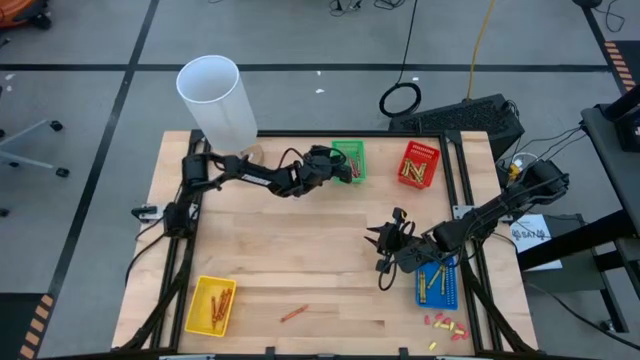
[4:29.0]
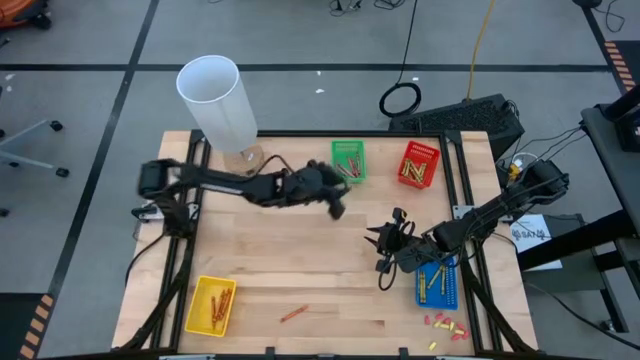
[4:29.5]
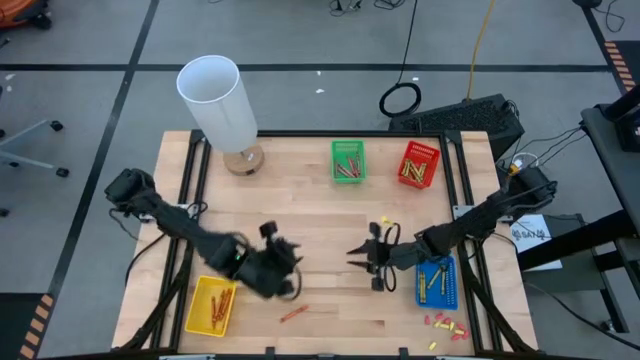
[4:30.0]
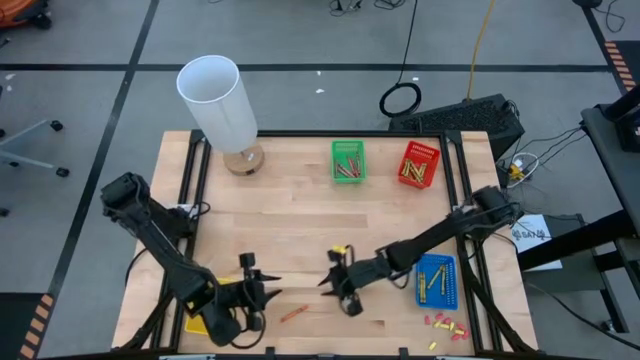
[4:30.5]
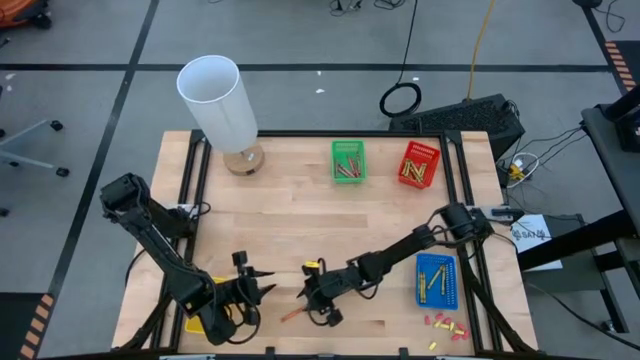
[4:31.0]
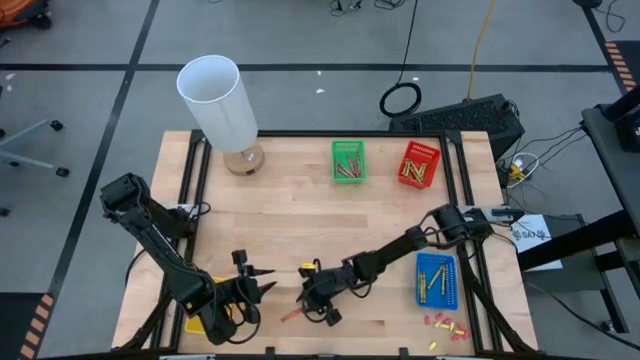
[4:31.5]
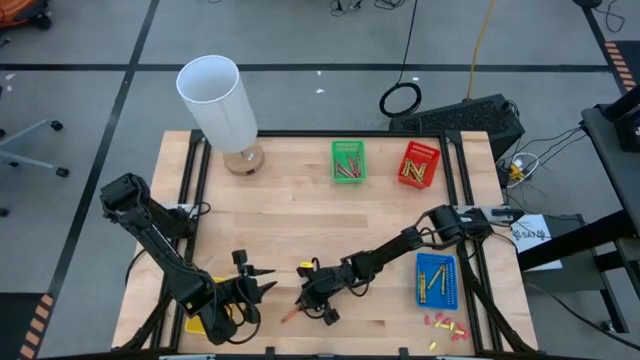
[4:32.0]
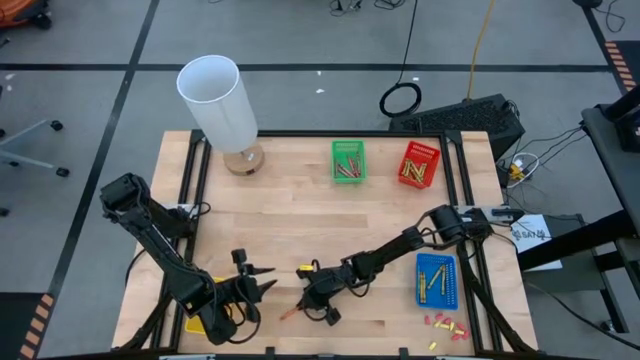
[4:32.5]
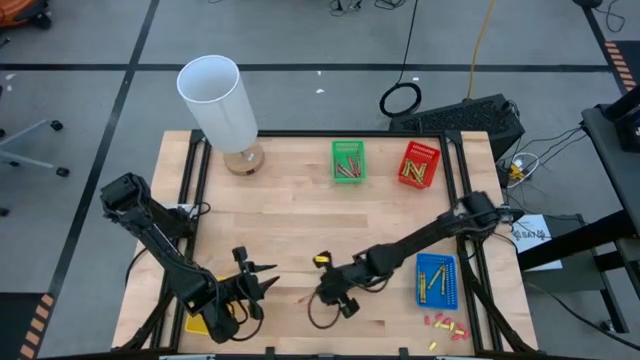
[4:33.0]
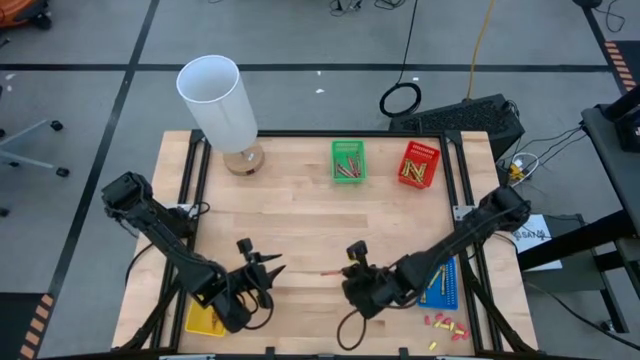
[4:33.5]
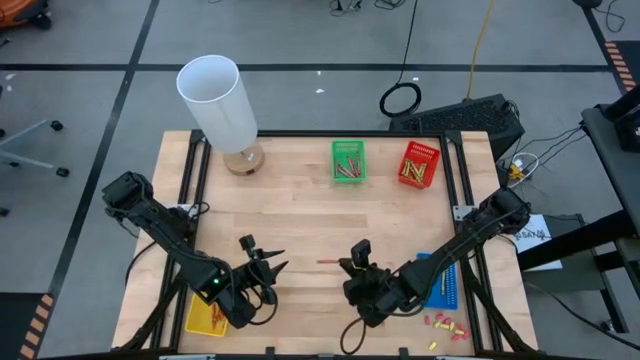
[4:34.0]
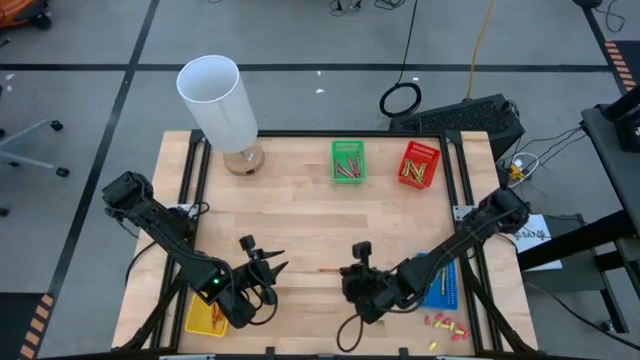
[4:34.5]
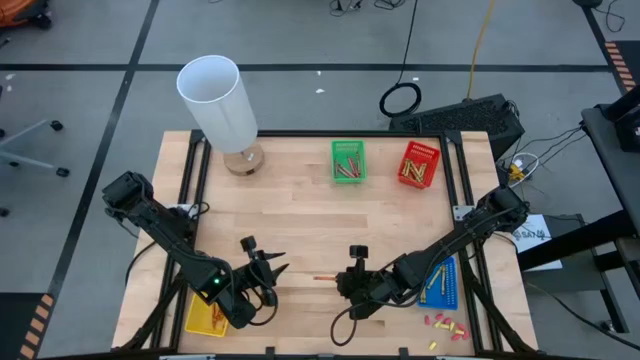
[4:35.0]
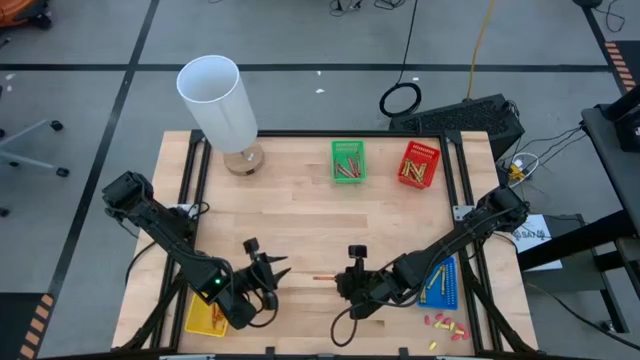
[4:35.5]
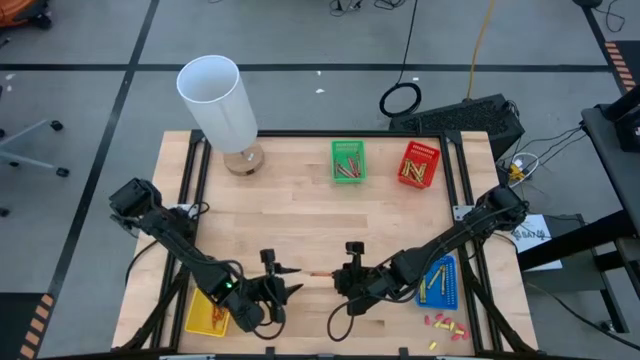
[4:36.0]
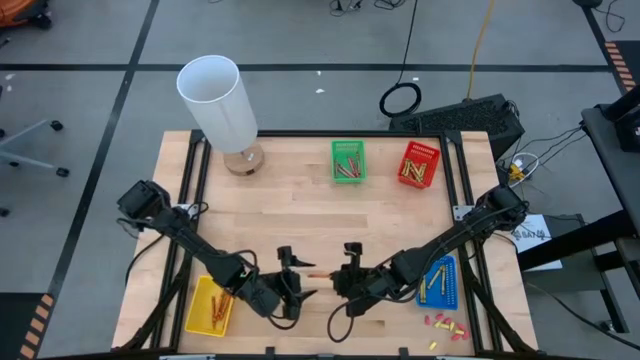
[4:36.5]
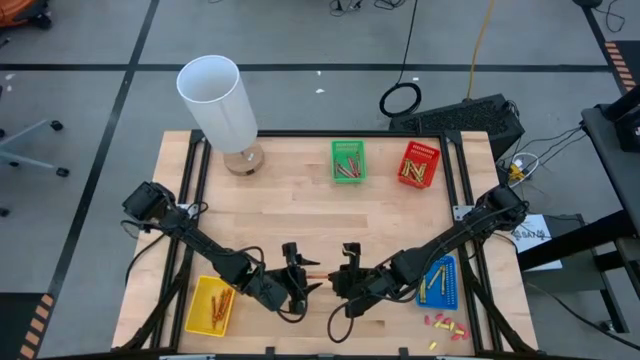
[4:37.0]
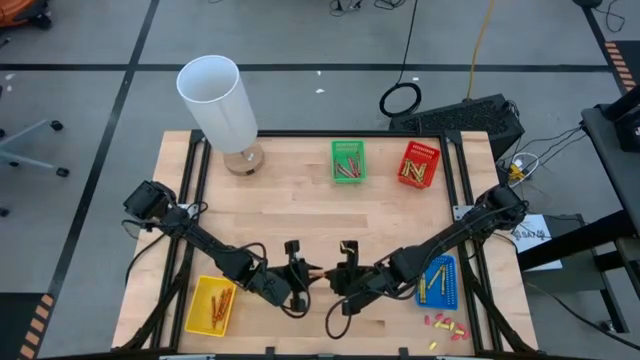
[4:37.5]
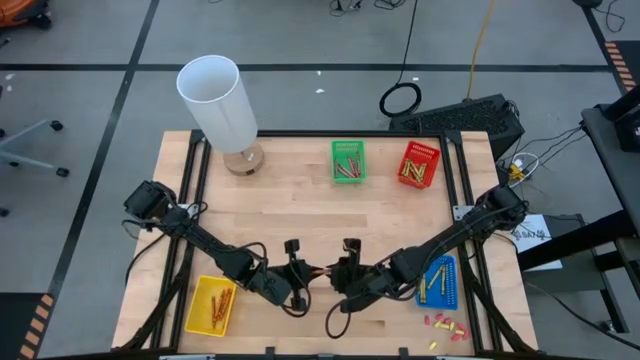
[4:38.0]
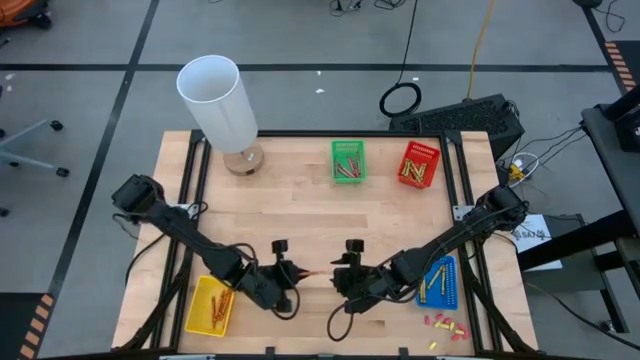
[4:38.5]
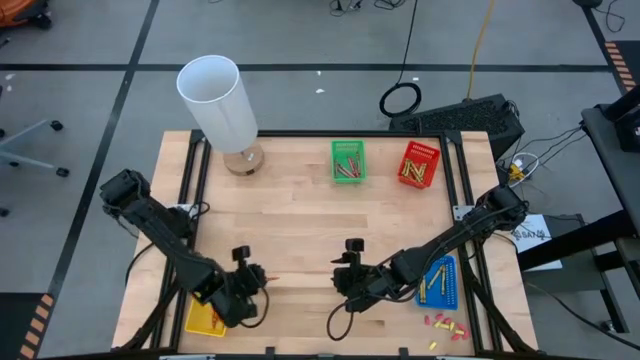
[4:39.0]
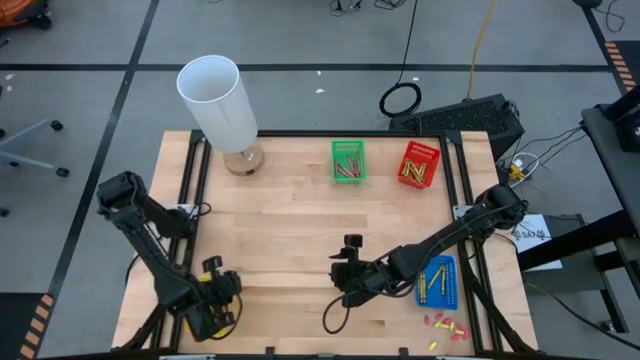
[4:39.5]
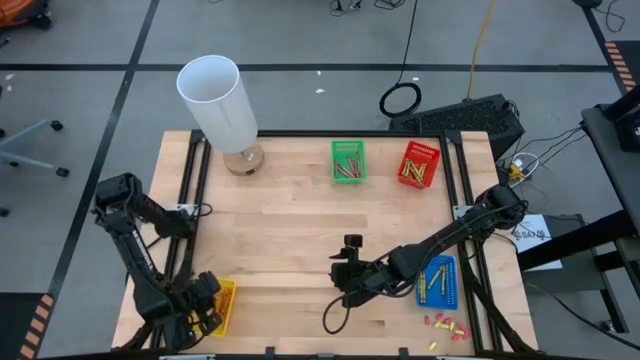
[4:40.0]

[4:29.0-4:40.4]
Task: Sort crayons
Put the orange crayon into the yellow bin

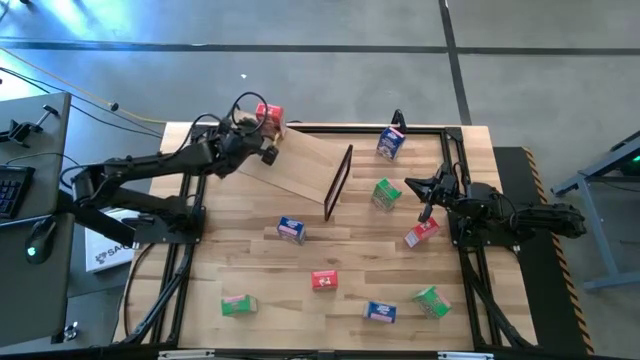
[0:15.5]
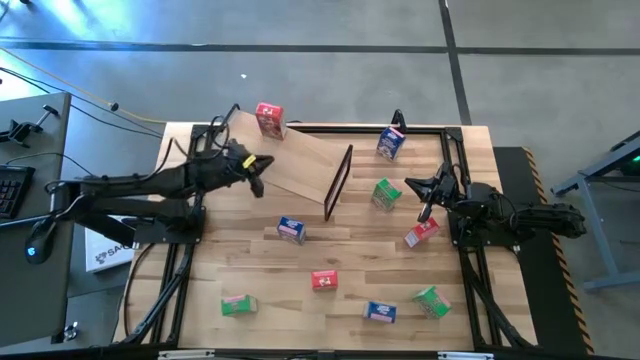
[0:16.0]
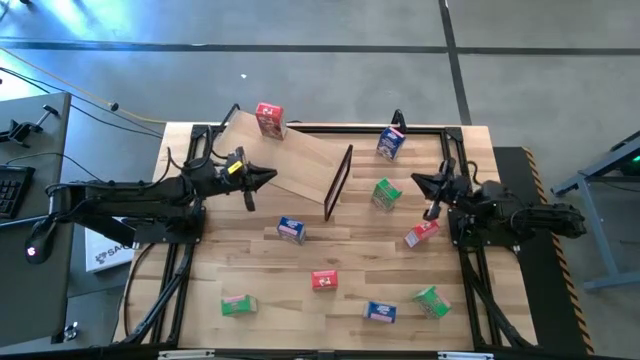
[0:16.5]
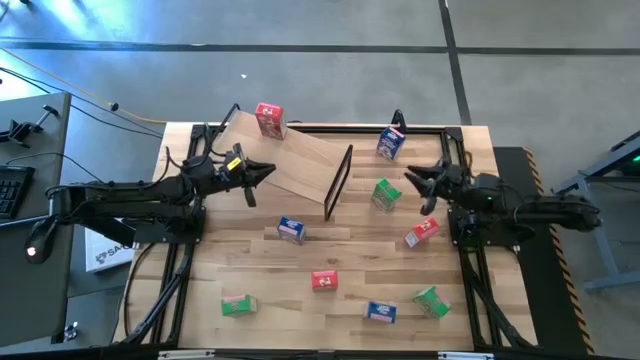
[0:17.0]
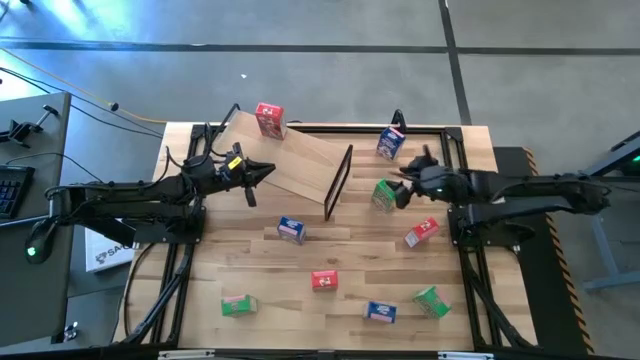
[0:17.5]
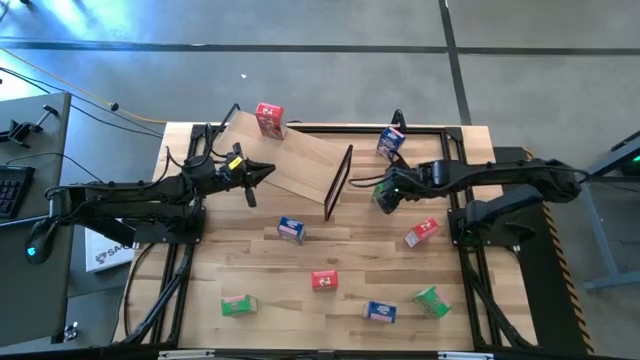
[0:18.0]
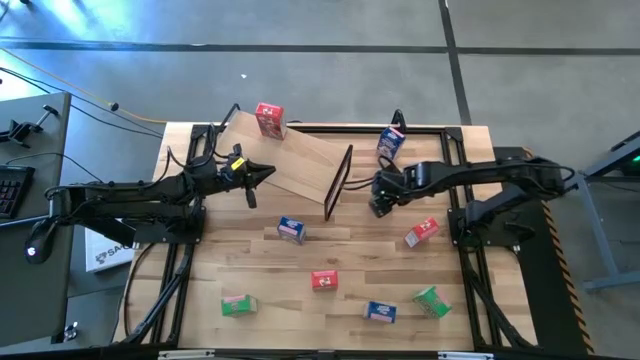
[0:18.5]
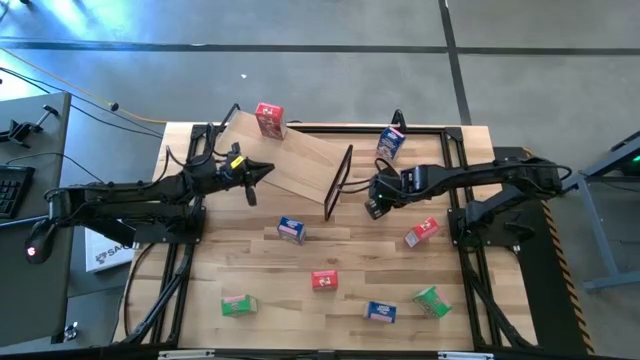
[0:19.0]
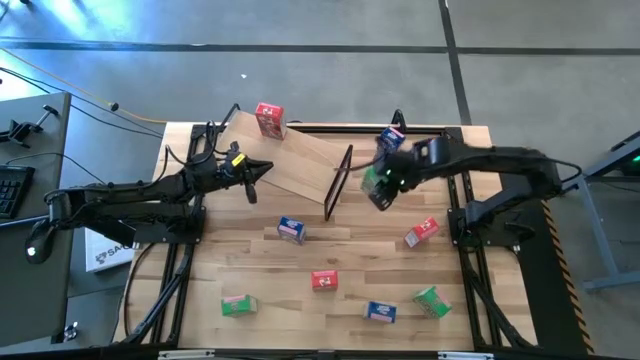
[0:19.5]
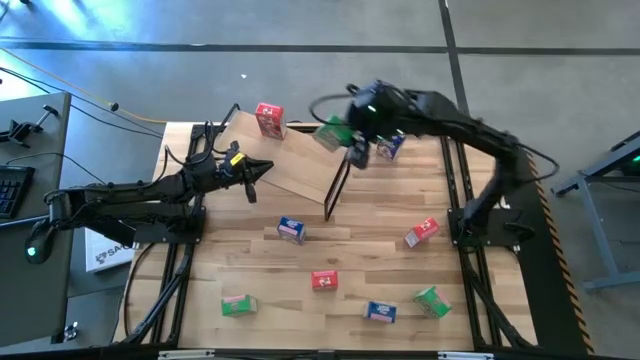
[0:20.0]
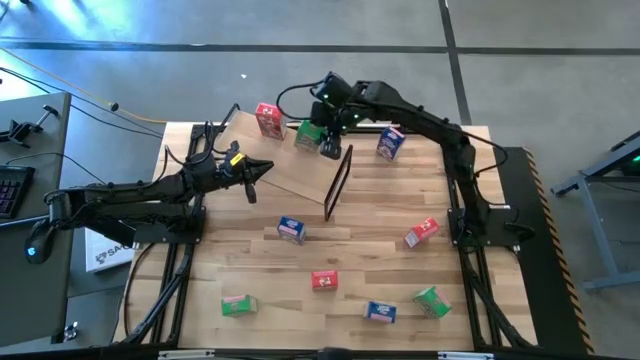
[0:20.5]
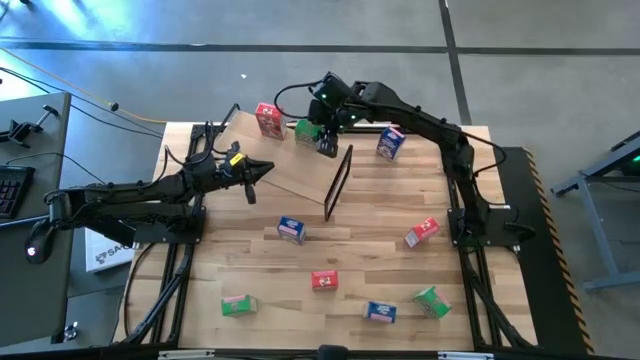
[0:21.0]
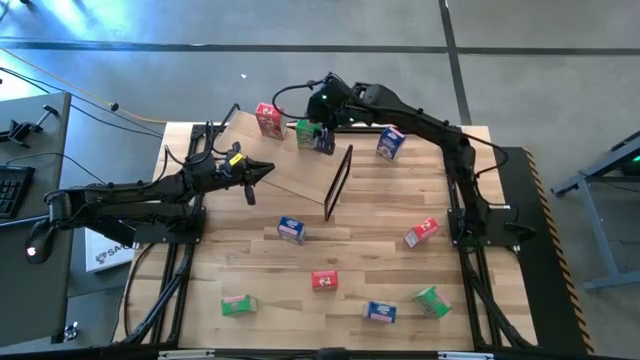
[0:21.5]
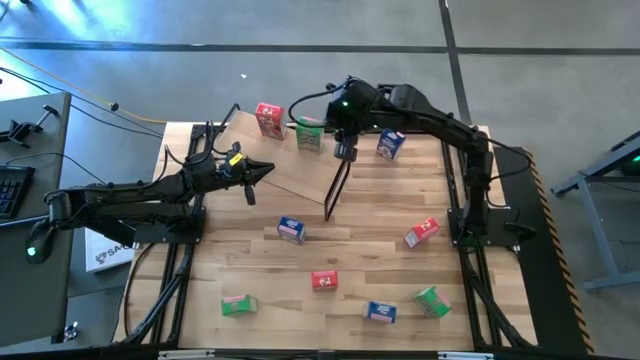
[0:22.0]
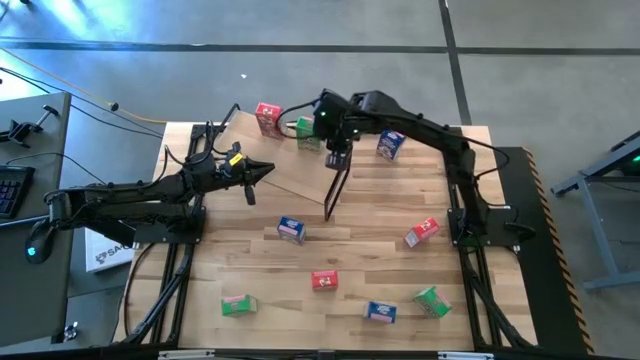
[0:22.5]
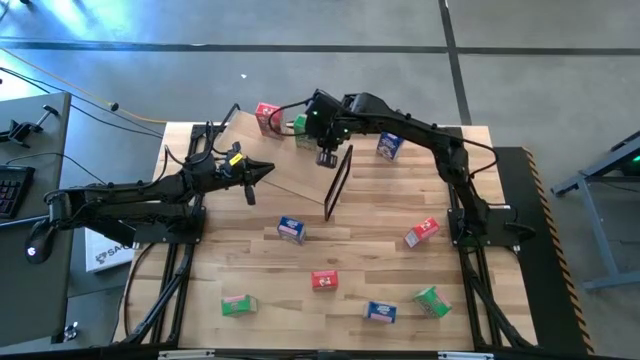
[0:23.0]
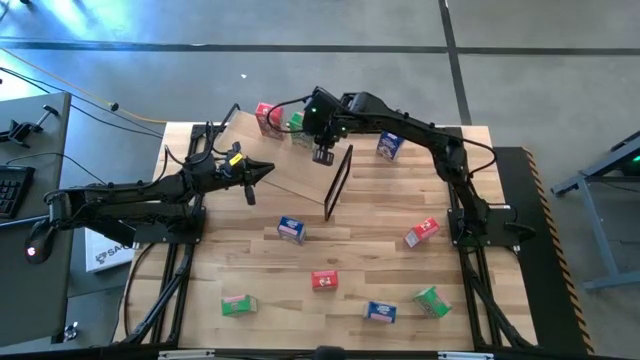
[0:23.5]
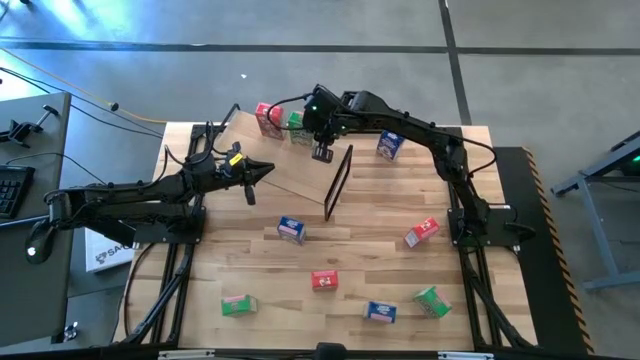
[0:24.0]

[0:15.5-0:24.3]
Task: Stack cereal on shelf
Put the top green cereal box on the shelf
